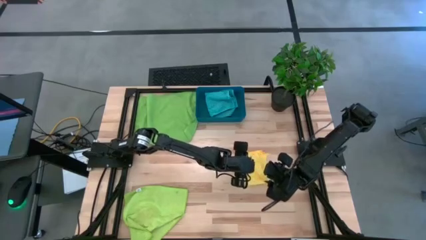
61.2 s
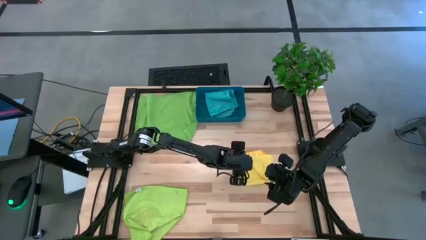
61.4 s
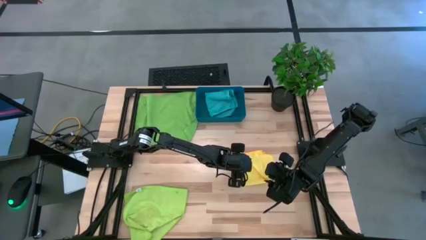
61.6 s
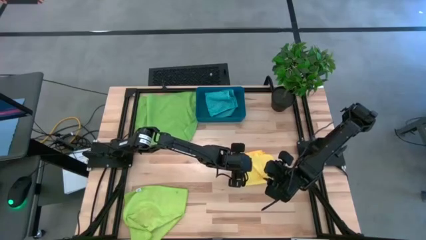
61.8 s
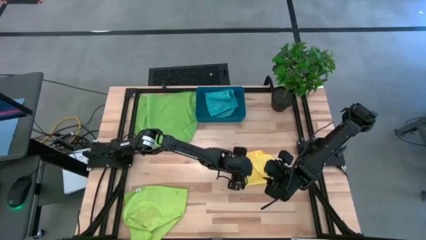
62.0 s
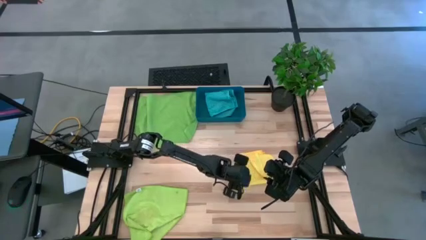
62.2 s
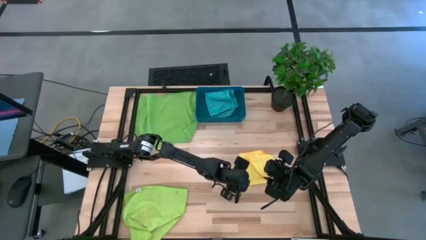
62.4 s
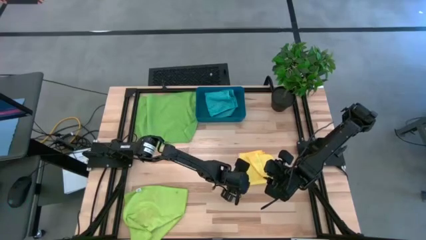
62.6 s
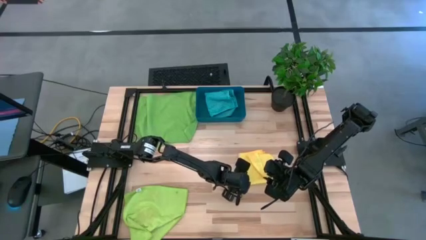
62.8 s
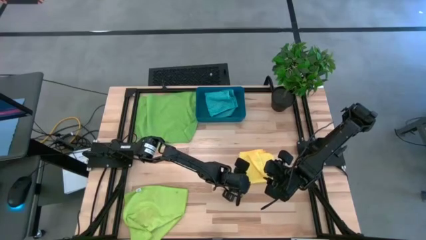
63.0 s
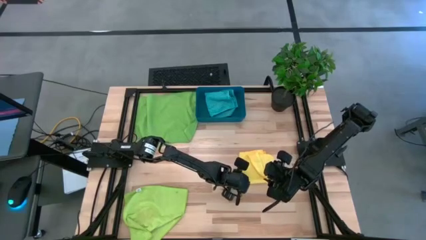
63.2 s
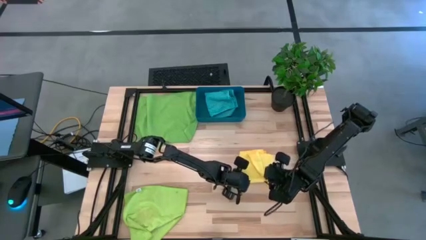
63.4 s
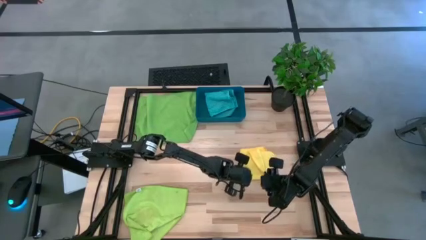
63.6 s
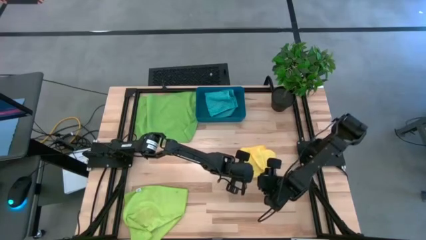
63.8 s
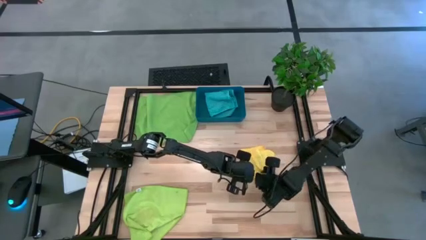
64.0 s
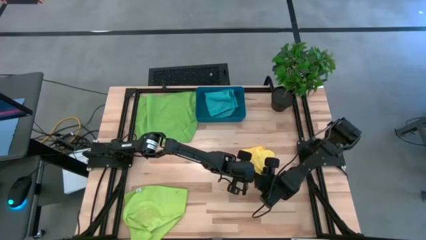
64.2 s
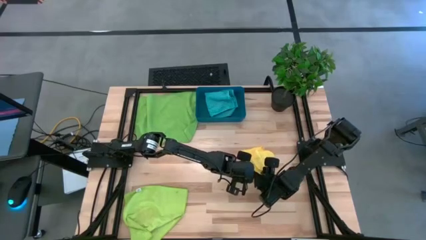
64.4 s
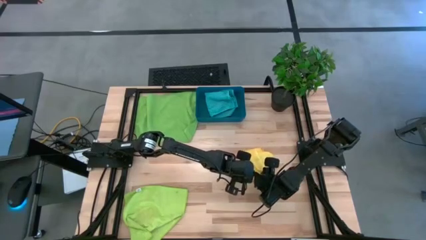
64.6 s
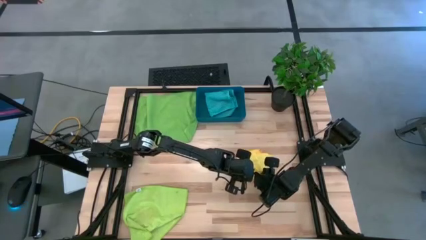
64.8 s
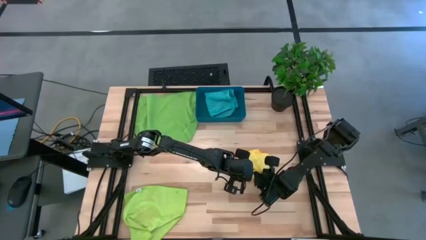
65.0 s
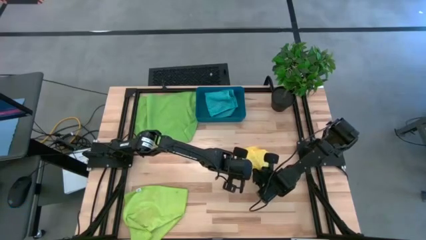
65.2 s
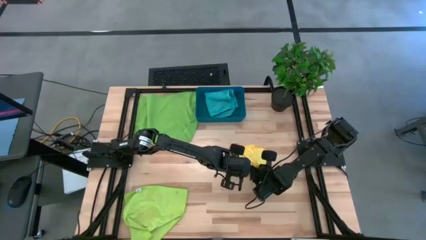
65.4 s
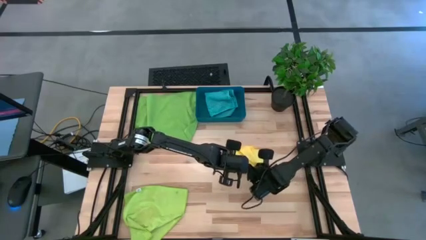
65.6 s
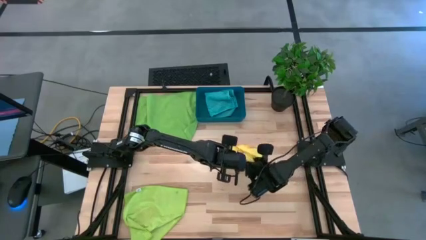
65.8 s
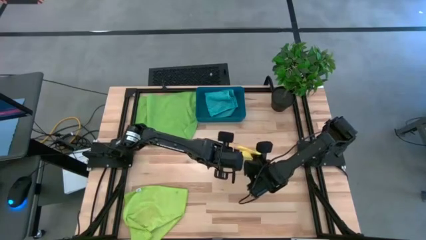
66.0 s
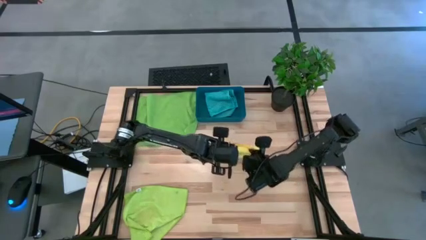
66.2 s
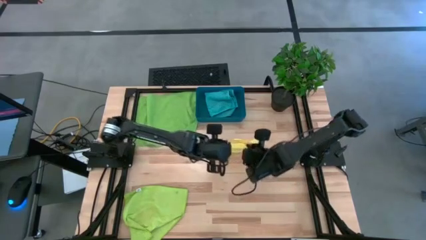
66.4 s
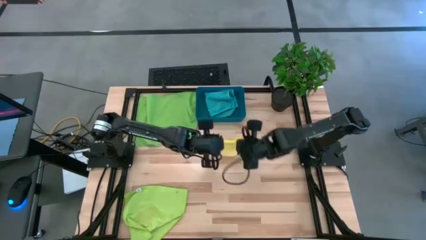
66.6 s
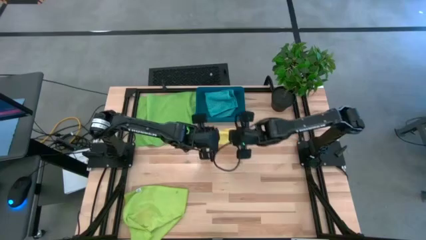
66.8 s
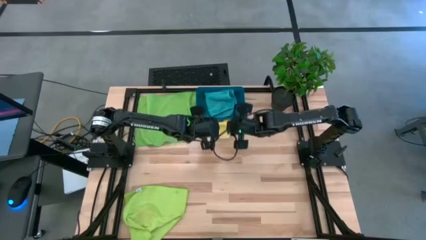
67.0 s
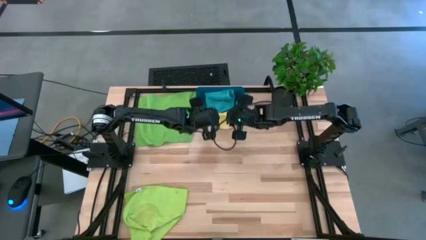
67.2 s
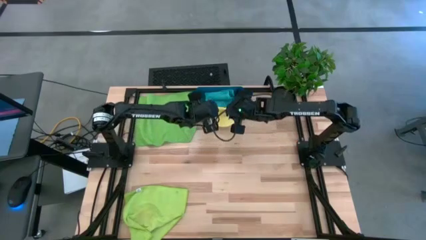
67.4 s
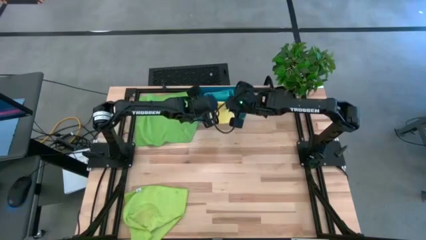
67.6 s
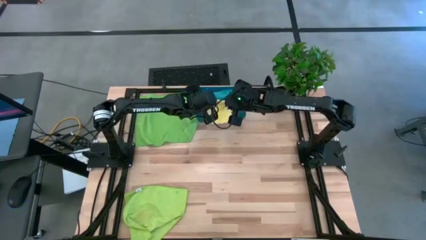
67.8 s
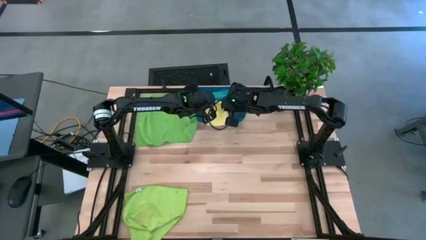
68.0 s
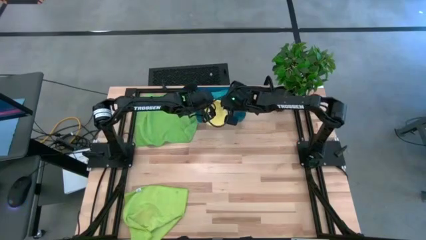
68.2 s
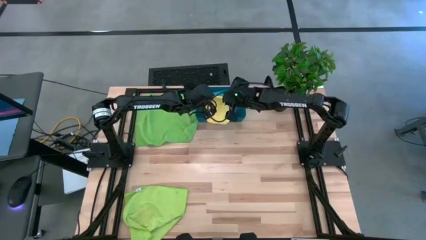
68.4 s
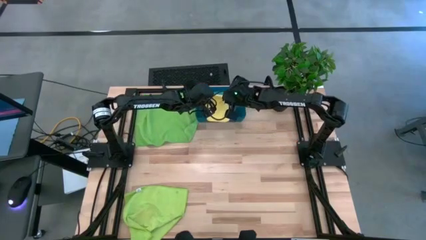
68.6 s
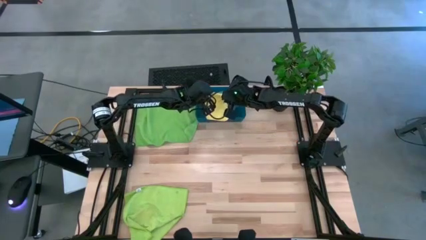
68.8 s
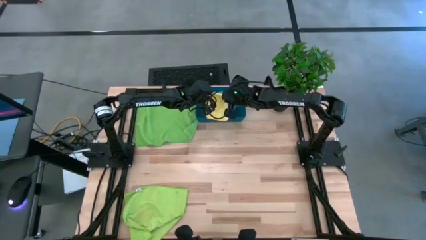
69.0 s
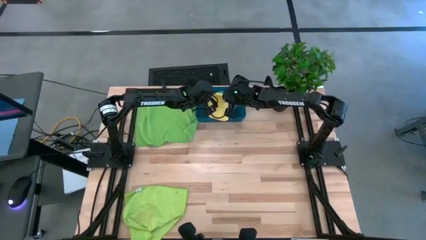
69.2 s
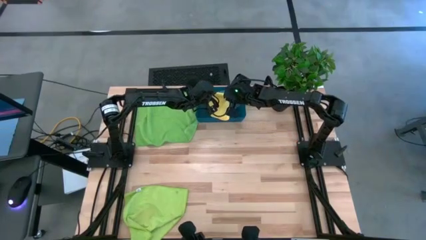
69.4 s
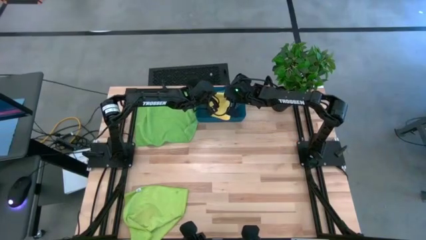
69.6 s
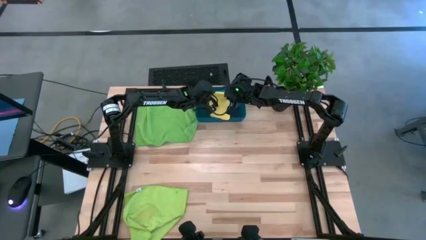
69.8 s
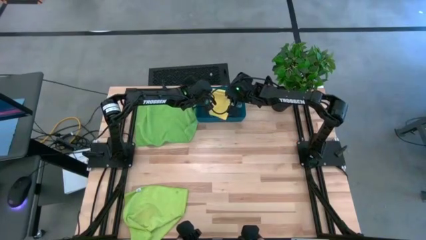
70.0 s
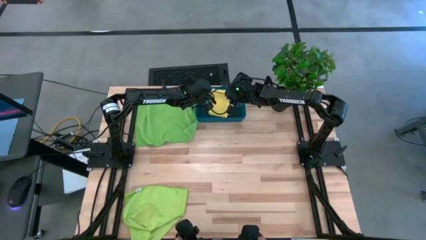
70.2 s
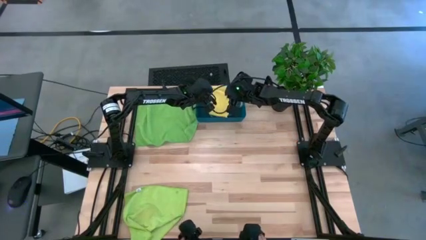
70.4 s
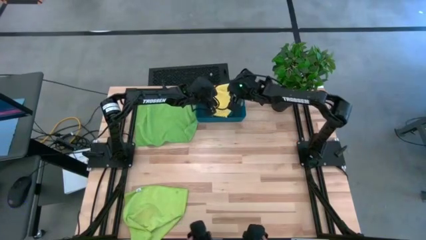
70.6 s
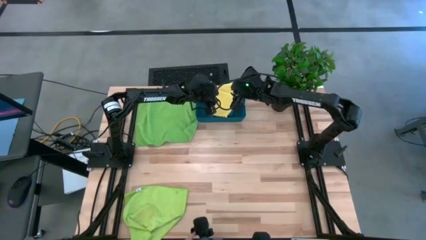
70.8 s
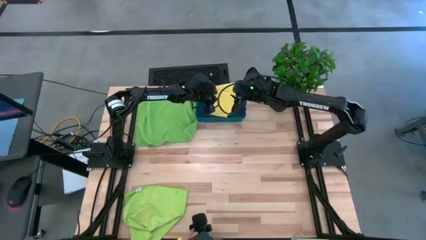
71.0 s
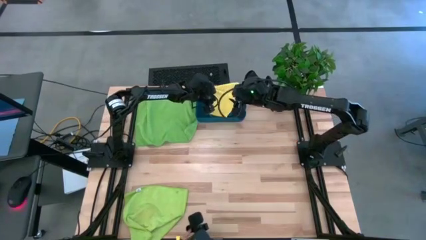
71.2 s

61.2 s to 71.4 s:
Task: Fold microfiber towels
Put the folded yellow microfiber cloth into the blue bin

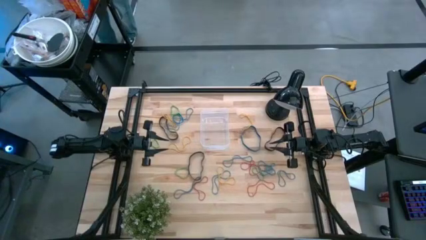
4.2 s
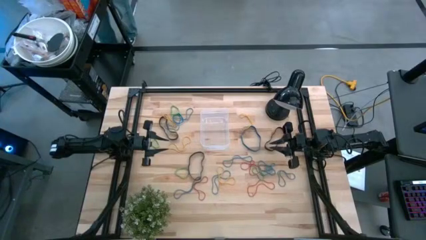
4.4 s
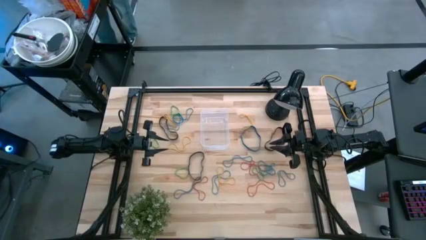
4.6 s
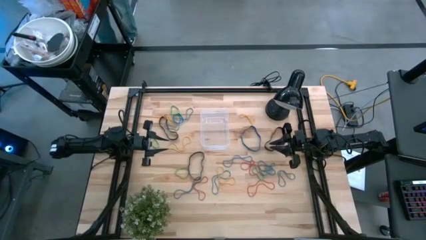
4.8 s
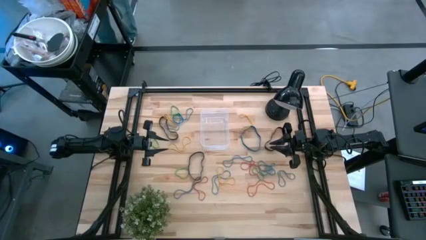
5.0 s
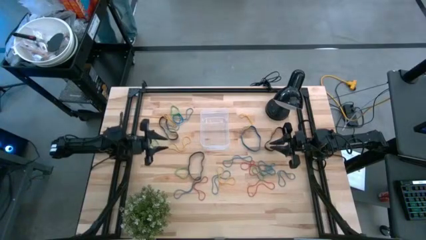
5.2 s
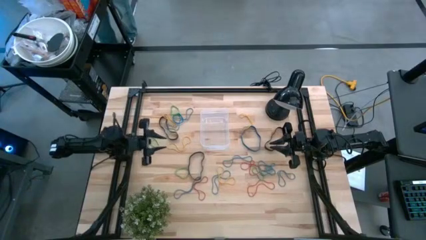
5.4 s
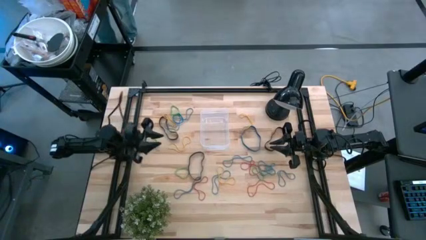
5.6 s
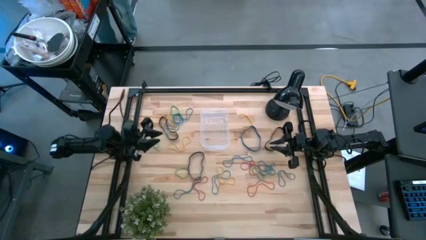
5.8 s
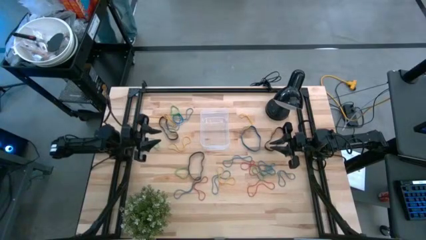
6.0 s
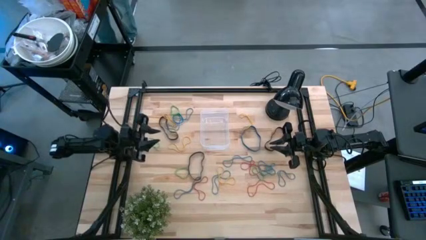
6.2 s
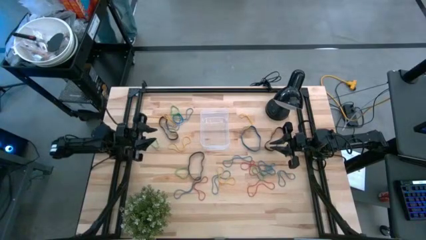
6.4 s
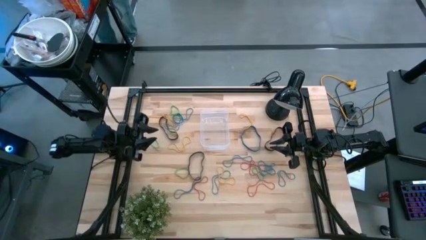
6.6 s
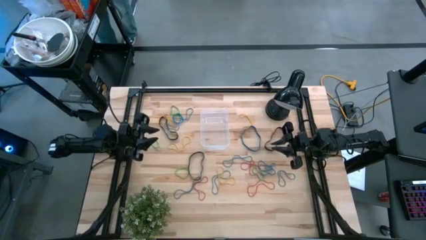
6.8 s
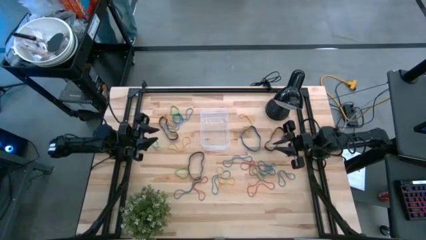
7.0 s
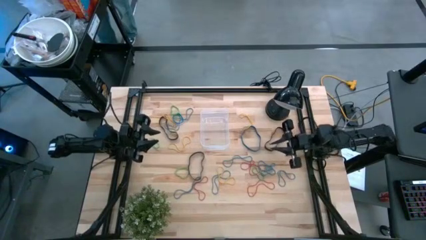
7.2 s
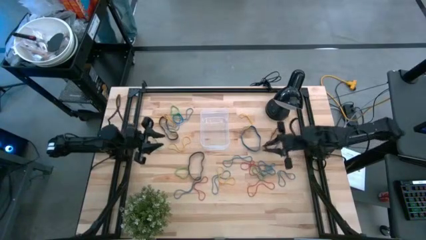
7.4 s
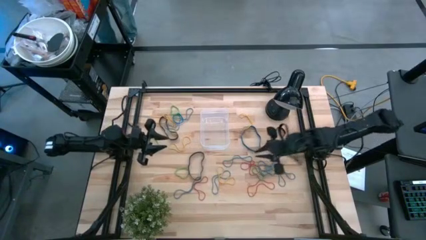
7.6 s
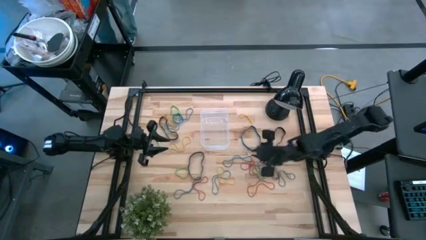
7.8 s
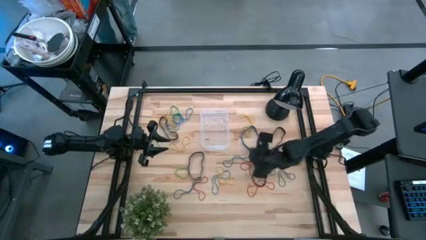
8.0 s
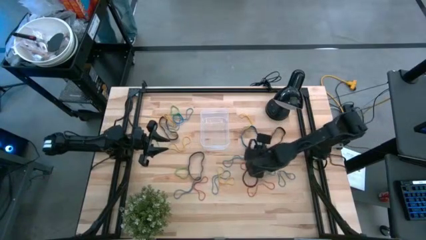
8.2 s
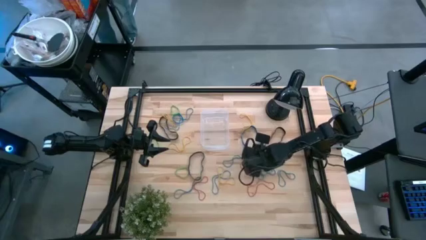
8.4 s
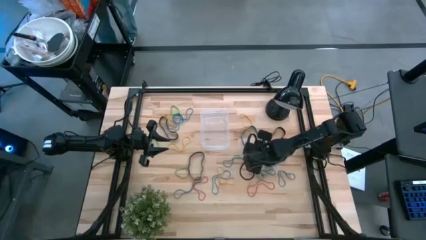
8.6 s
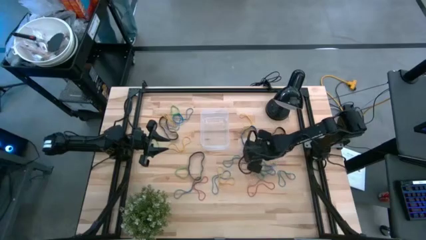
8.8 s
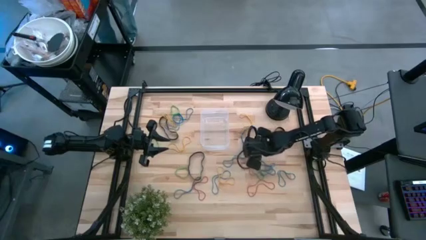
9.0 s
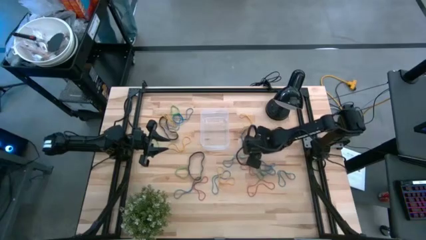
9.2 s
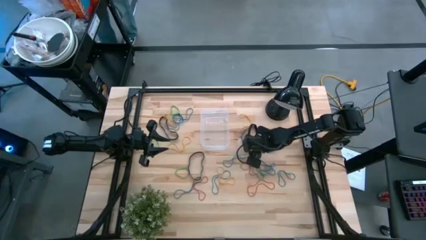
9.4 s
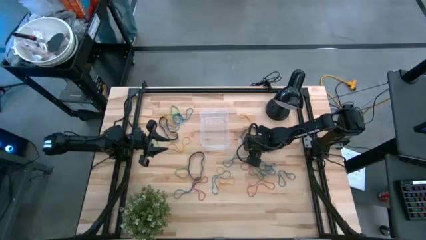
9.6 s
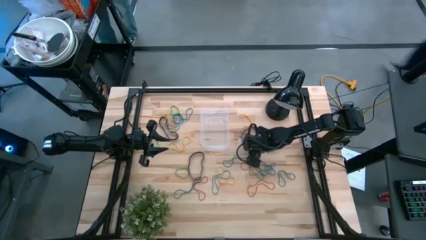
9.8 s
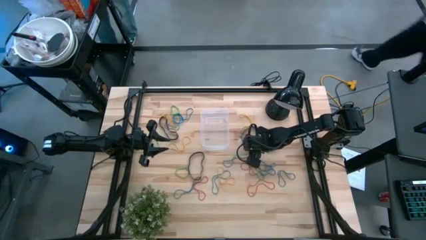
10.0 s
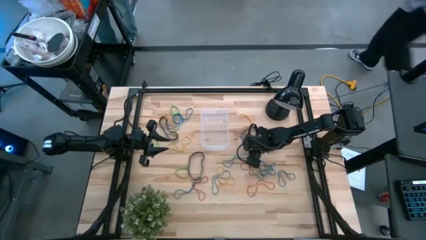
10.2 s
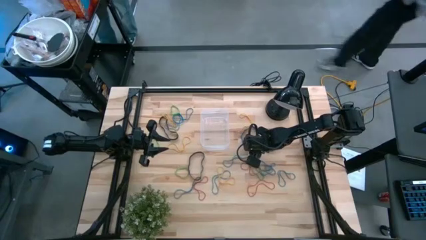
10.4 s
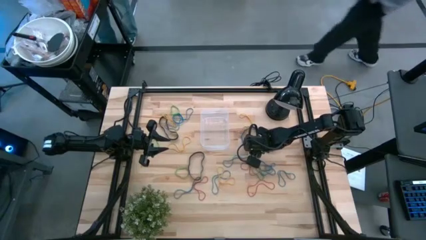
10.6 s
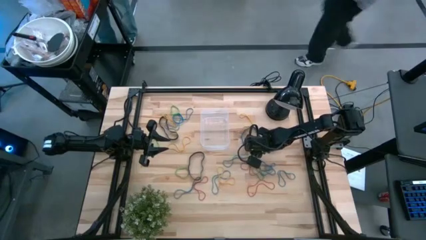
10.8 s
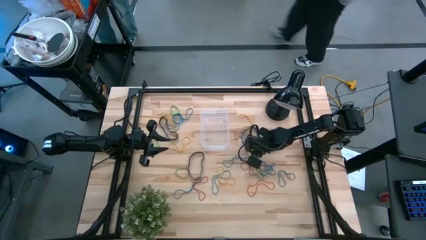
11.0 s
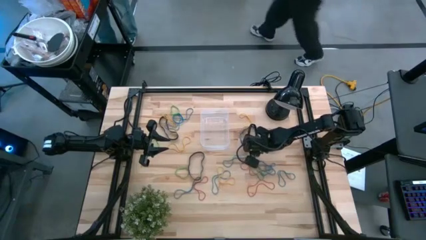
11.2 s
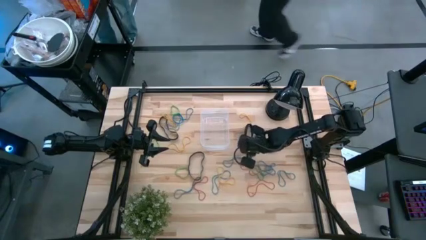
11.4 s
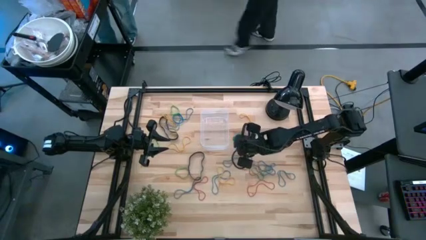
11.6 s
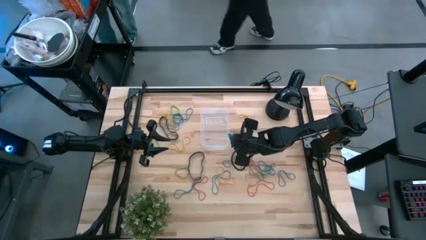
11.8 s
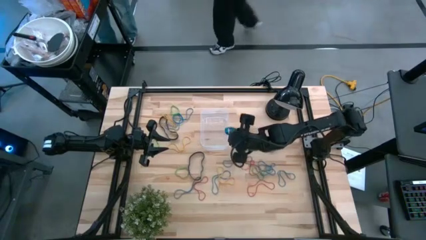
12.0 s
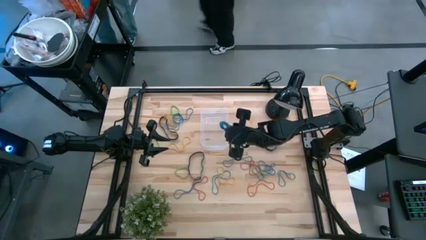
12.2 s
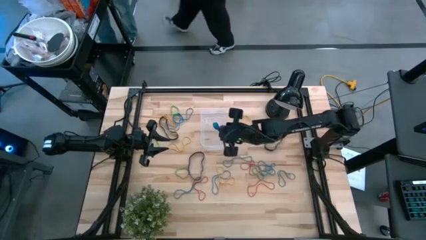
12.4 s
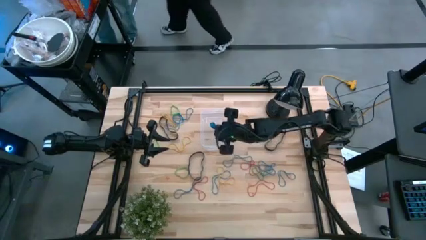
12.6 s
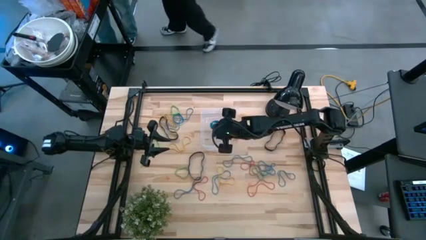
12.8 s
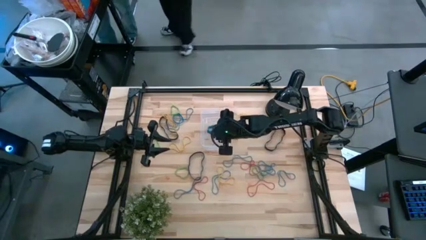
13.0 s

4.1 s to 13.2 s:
Task: Pick and place rubber bands into bin
Put the blue rubber band into the transparent bin
